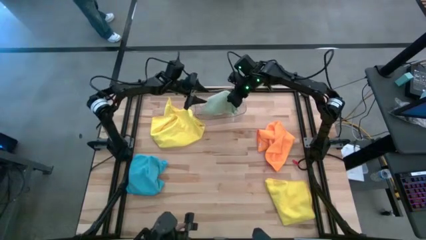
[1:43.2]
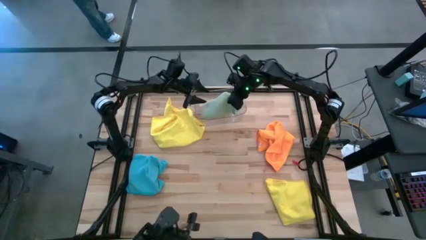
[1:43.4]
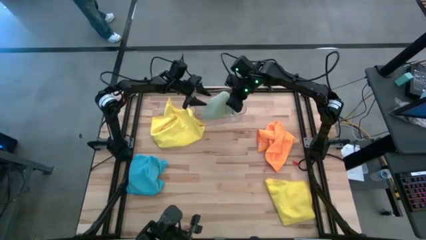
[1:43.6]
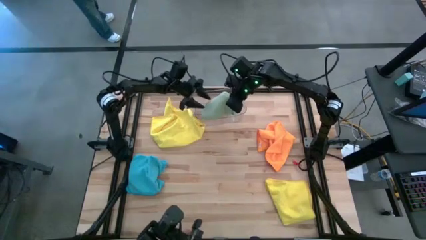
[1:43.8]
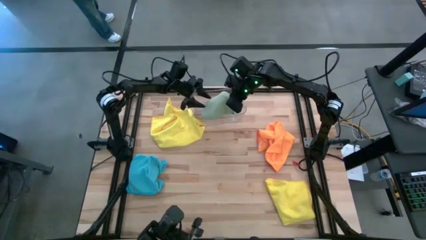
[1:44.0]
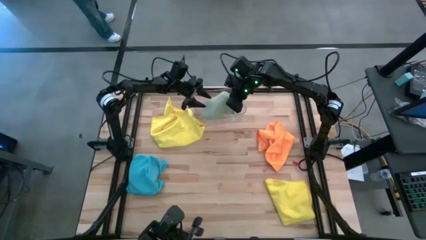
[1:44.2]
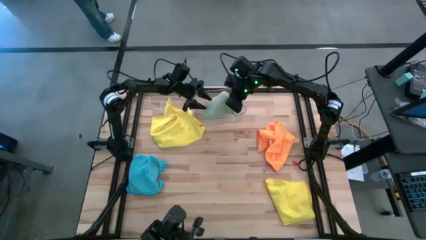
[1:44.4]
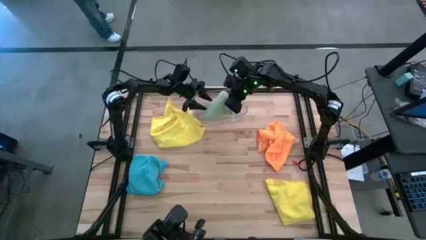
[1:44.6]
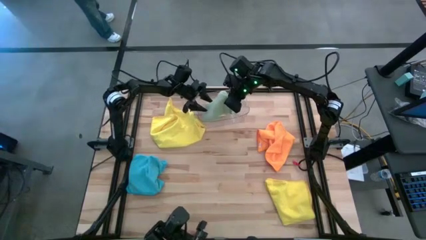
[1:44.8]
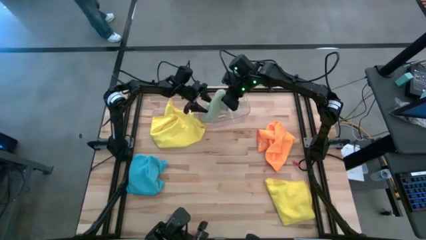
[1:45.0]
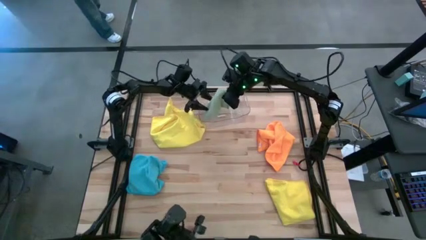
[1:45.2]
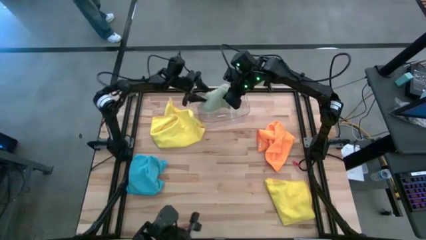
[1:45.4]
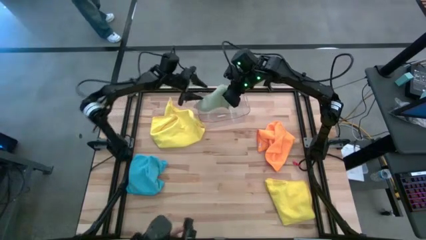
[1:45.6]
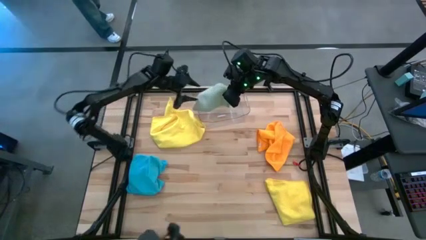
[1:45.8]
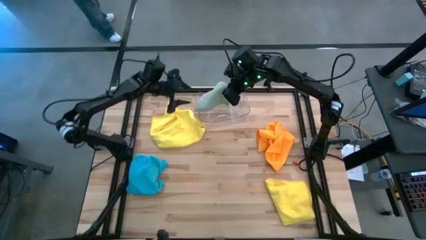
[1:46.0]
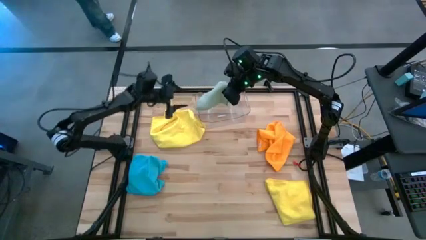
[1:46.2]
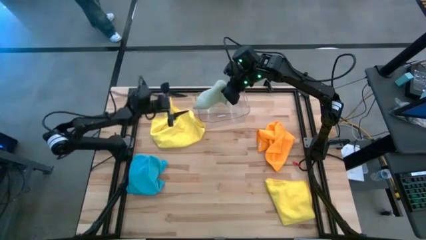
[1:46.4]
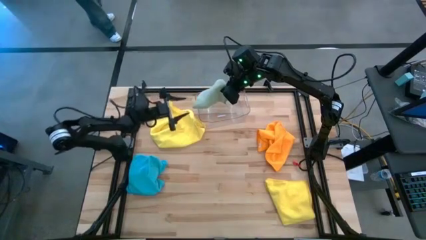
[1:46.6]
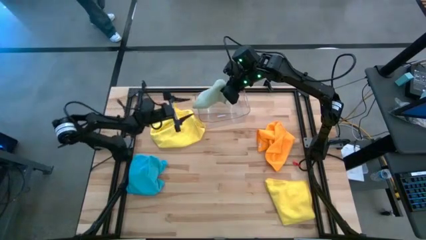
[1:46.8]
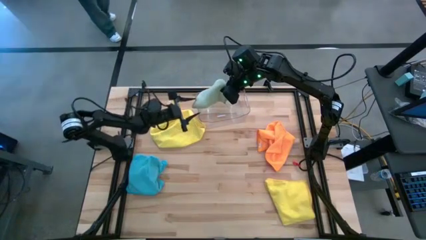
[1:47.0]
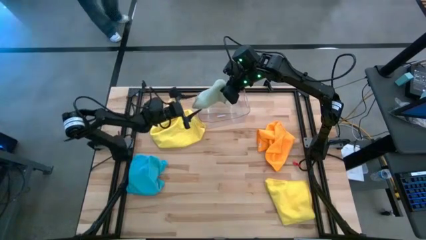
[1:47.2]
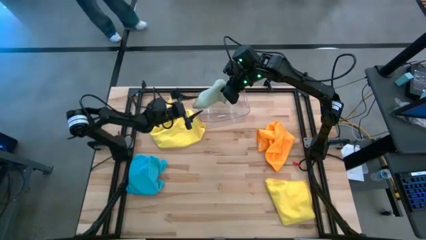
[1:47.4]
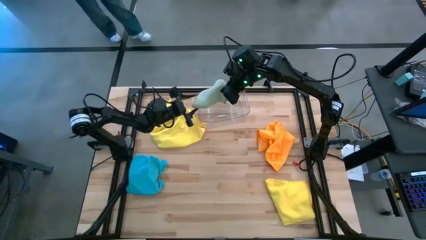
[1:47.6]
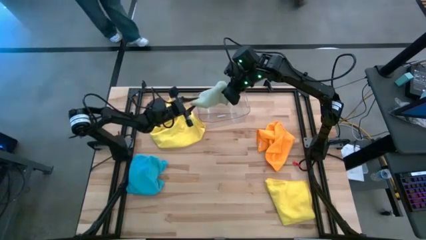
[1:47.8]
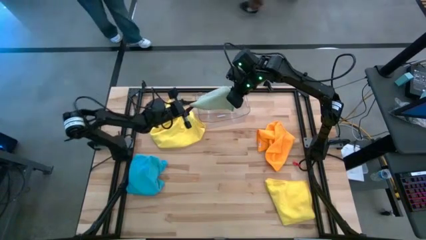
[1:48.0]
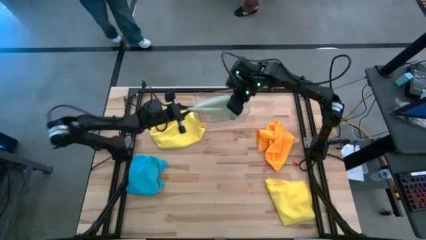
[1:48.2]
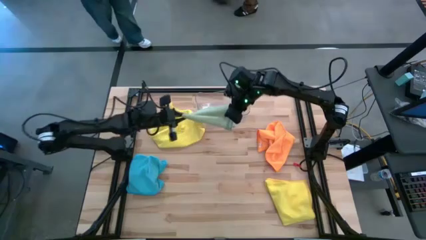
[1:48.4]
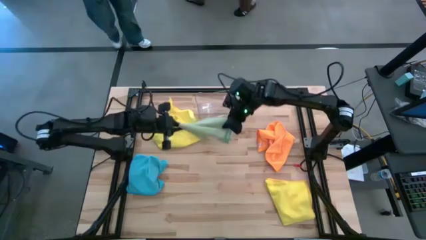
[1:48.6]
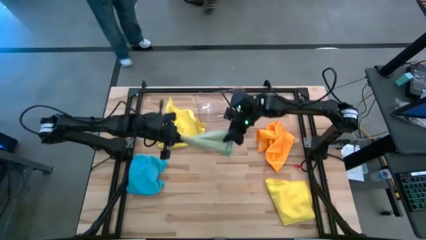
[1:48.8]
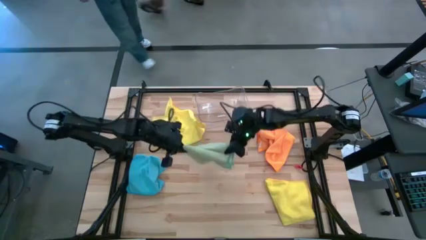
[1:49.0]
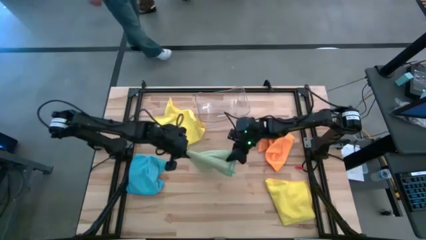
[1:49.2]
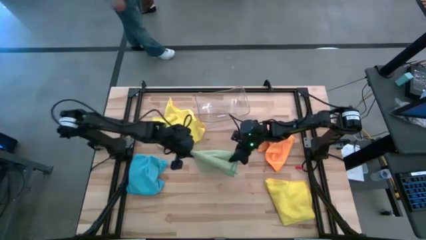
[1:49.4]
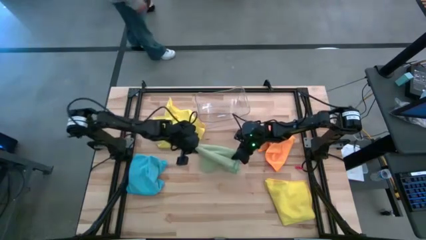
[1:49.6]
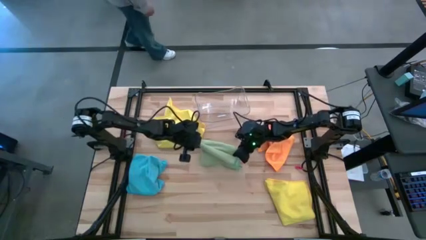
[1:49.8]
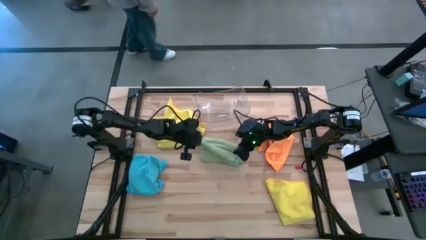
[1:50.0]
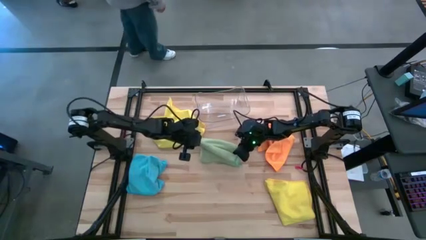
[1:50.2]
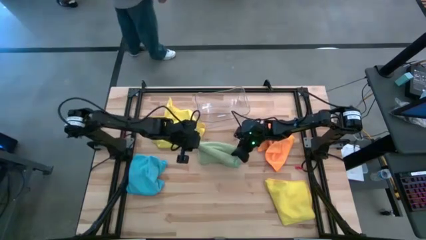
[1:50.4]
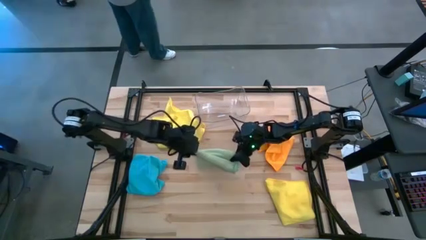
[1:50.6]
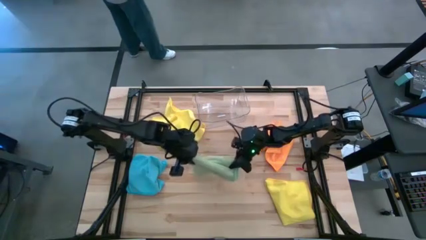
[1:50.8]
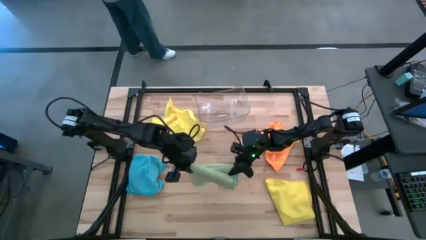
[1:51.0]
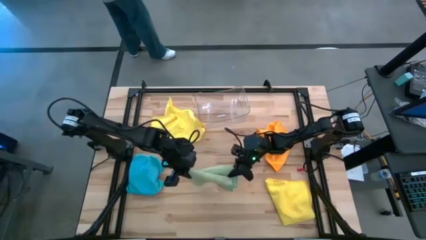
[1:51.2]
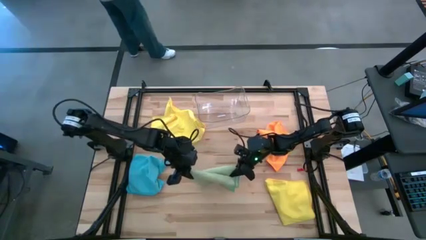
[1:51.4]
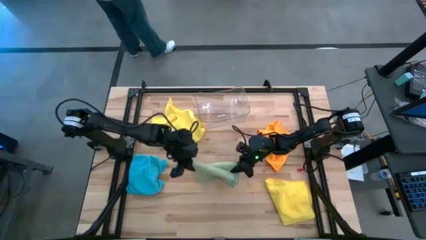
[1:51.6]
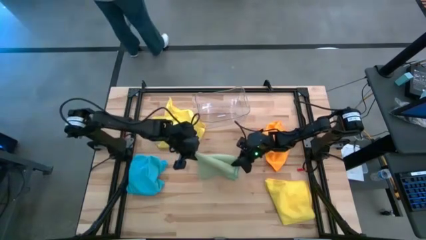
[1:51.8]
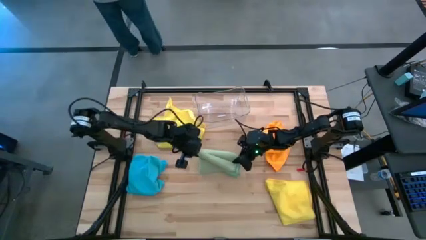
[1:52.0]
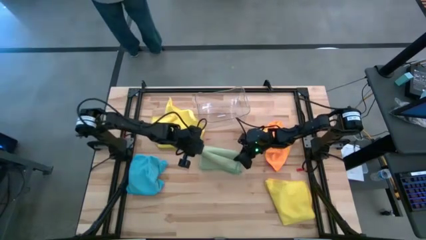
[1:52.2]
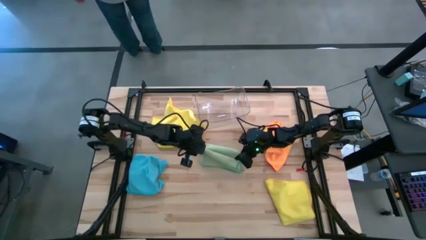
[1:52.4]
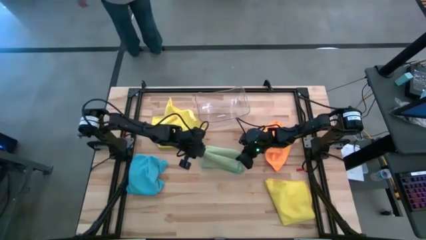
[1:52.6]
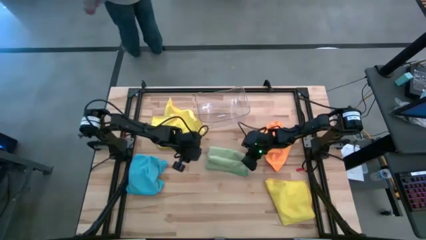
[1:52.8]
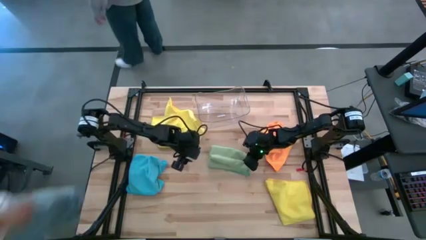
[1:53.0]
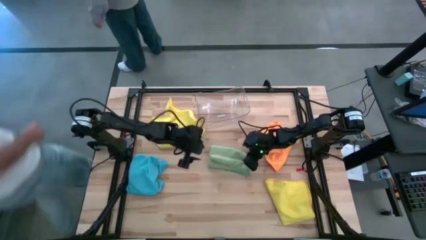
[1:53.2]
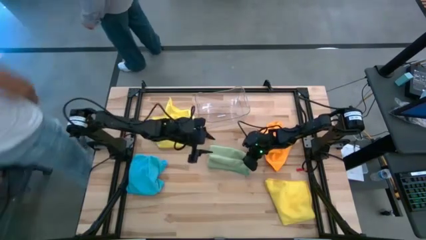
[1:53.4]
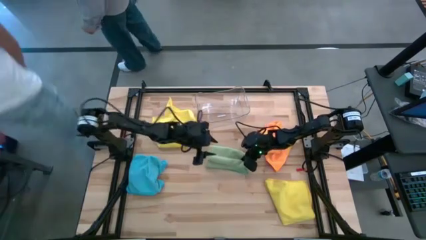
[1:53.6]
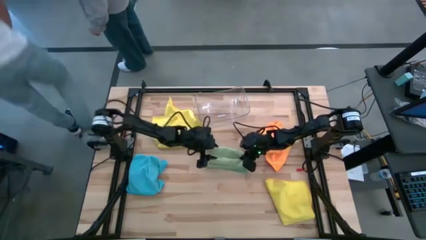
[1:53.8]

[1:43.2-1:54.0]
Task: Fold microfiber towels
Put the light green microfiber cloth into the transparent bin
